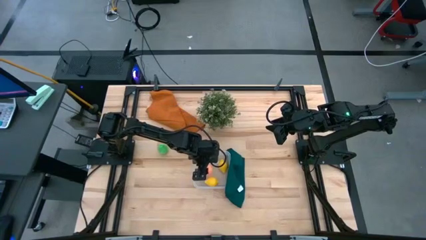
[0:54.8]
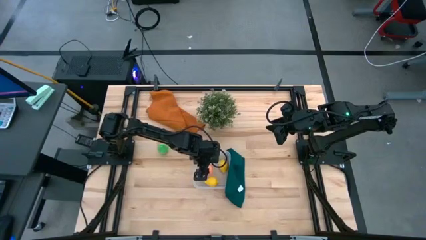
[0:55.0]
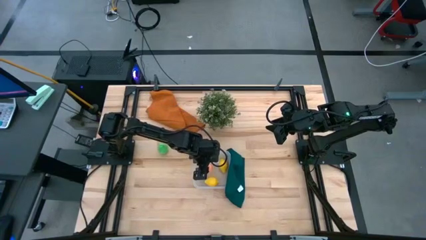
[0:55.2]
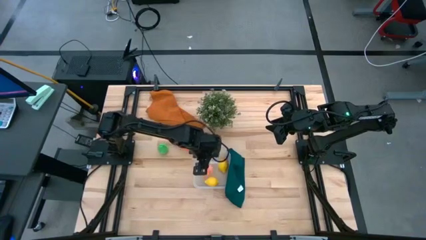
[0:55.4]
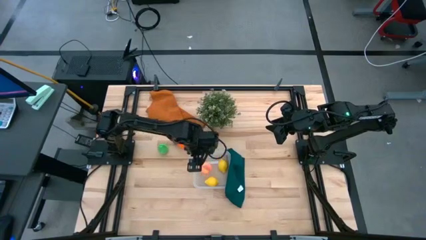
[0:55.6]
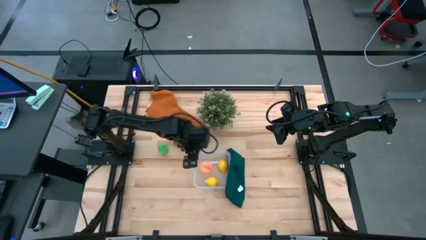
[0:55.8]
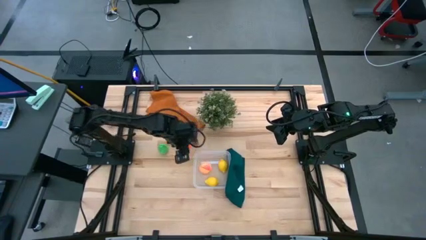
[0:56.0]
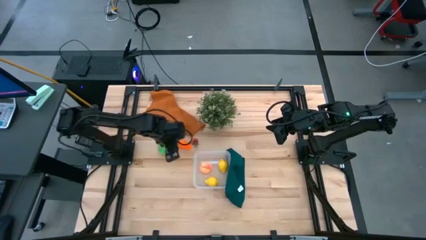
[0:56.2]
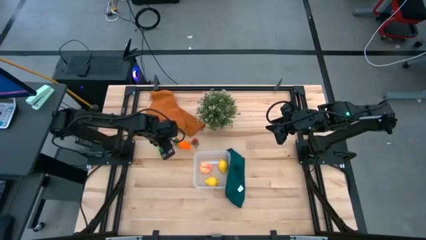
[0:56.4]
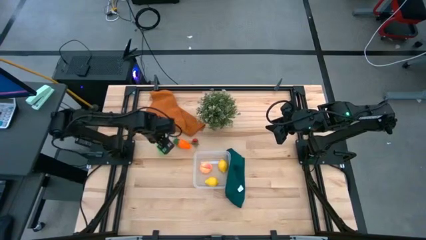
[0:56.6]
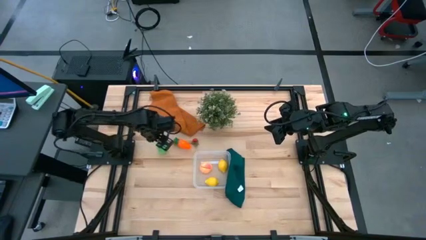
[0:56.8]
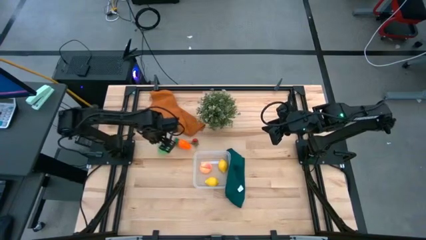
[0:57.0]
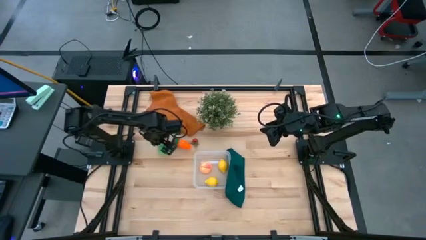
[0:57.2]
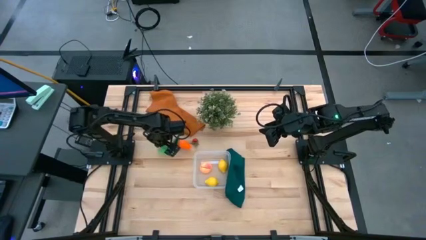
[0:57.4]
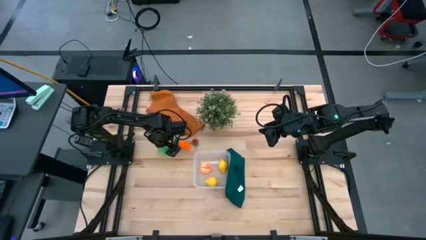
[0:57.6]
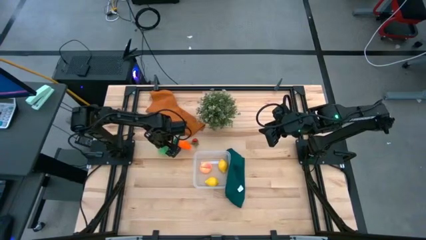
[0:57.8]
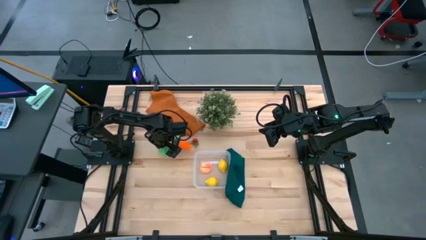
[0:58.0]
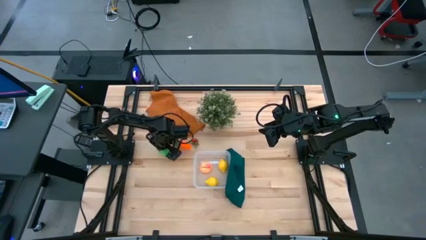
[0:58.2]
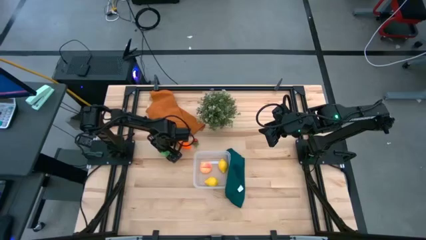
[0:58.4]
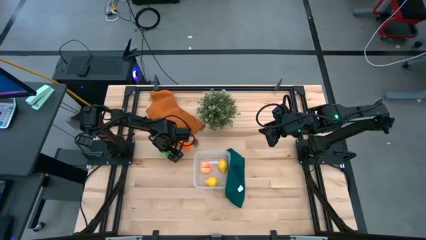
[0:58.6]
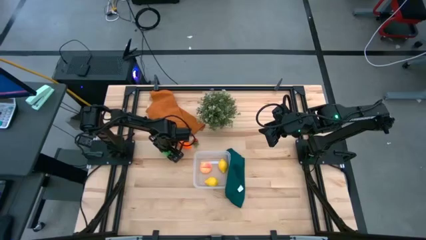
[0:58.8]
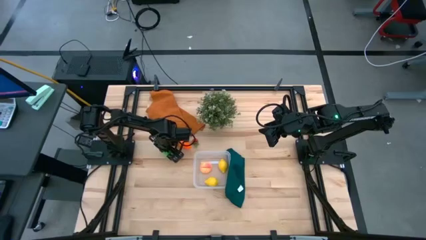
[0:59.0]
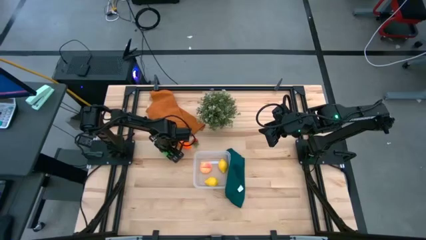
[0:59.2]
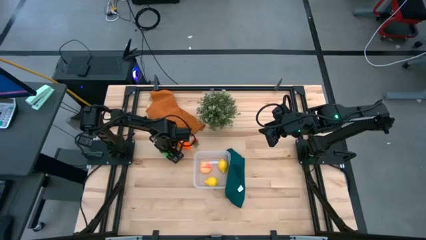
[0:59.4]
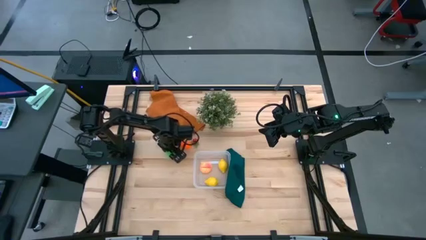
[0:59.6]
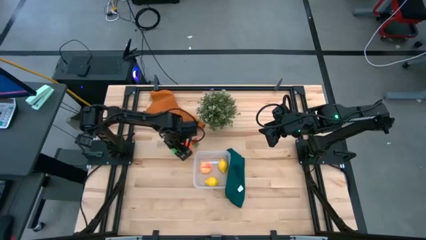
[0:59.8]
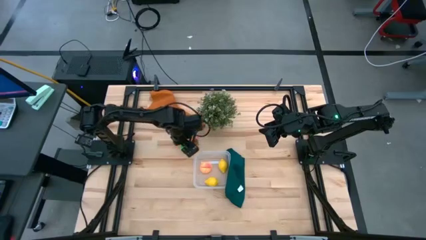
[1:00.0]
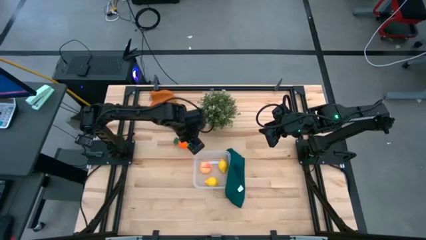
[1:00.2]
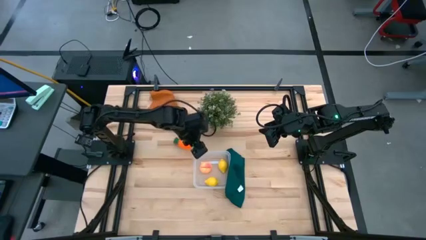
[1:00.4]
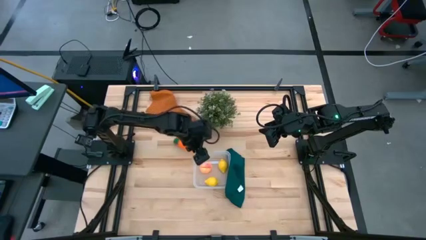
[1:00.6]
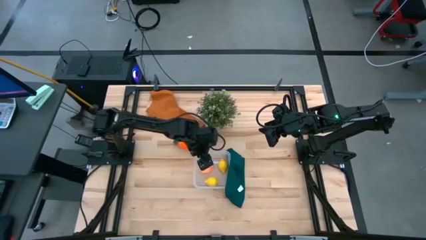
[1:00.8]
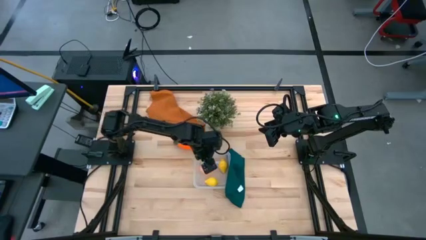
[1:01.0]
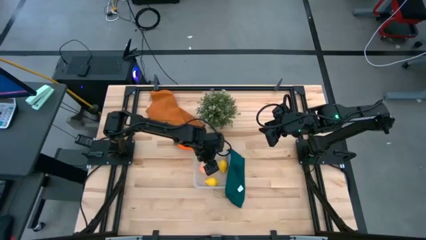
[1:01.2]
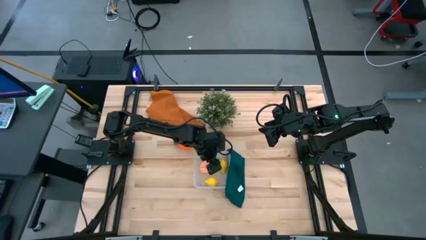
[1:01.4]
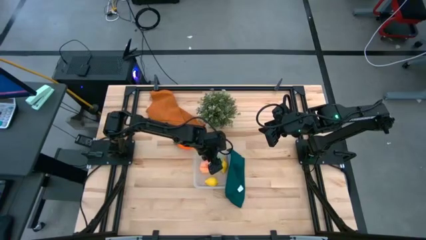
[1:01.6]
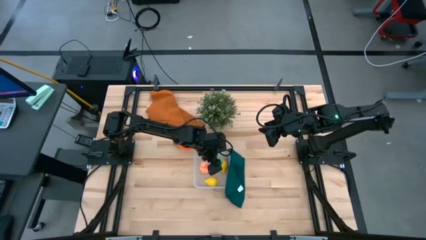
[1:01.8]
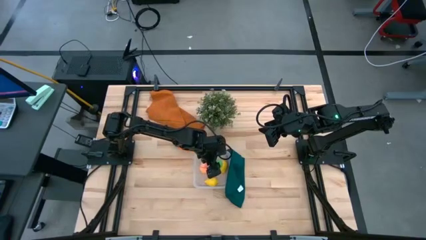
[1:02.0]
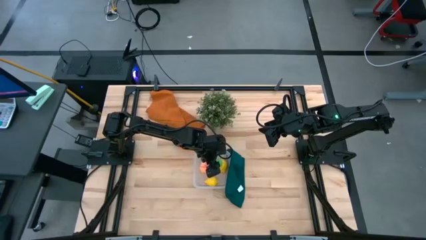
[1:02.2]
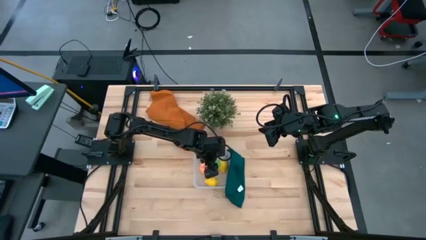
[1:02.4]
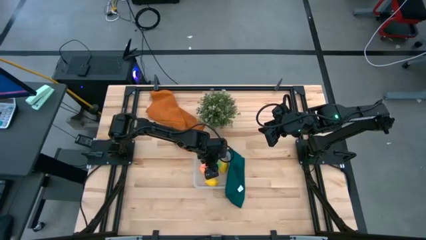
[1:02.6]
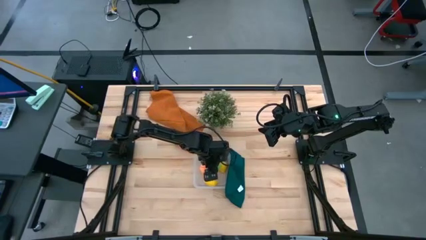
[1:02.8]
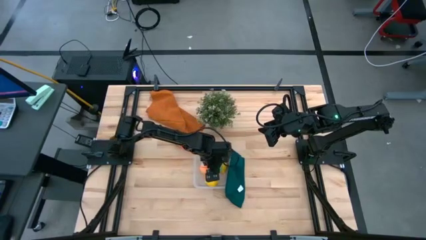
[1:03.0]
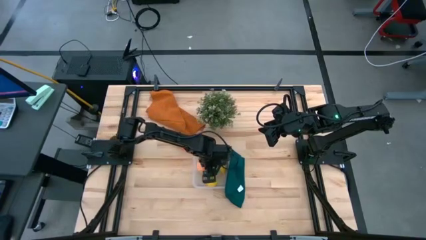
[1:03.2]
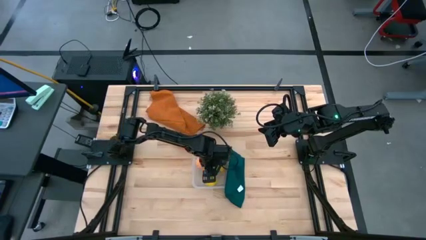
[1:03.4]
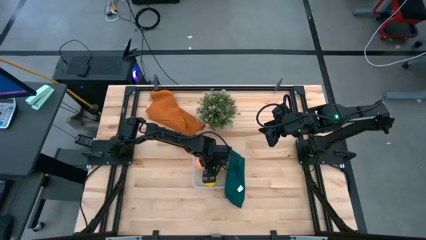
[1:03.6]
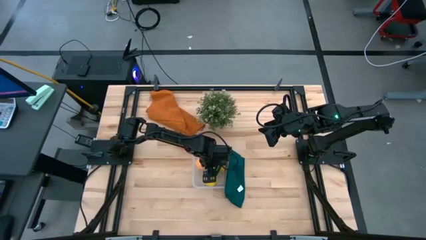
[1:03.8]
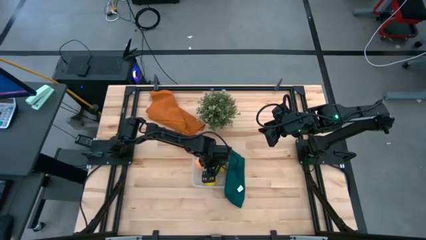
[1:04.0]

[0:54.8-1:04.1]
Task: Pick and placing Produce into tupperware
Put the green pear into the transparent bin

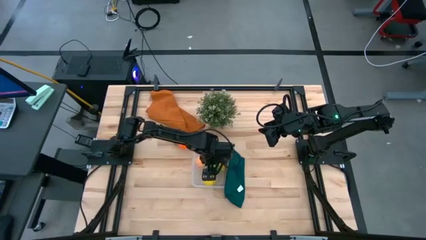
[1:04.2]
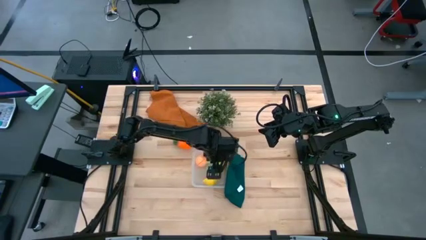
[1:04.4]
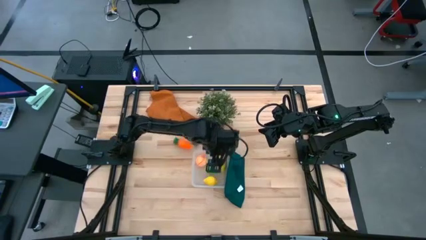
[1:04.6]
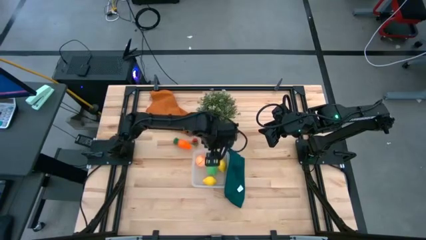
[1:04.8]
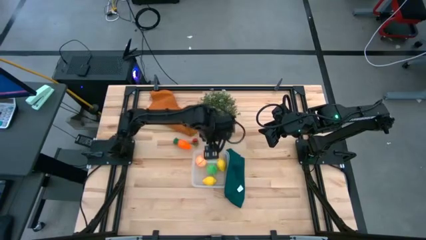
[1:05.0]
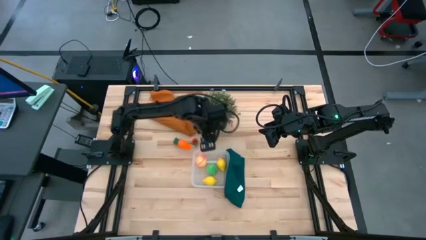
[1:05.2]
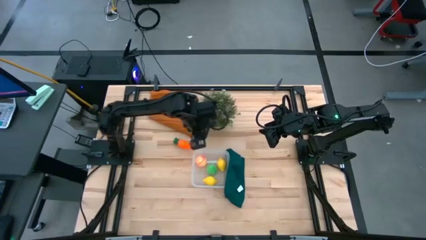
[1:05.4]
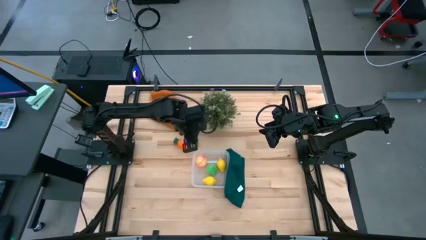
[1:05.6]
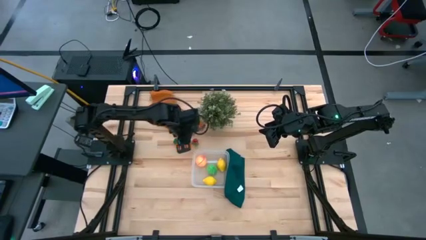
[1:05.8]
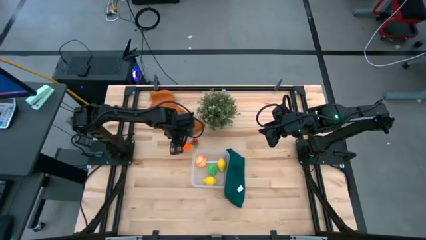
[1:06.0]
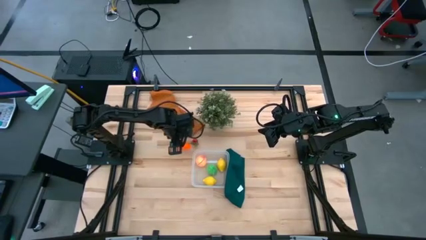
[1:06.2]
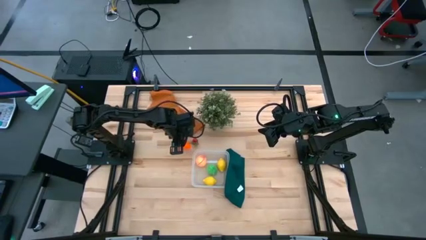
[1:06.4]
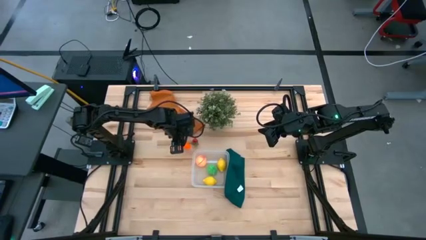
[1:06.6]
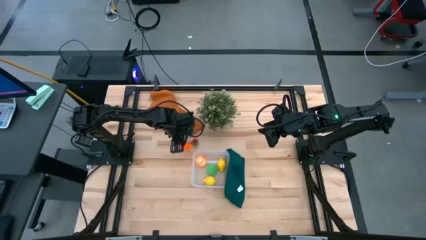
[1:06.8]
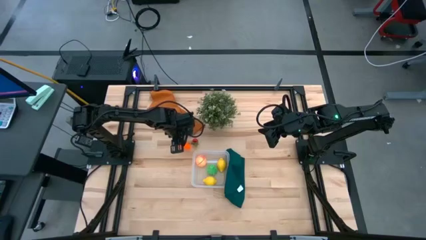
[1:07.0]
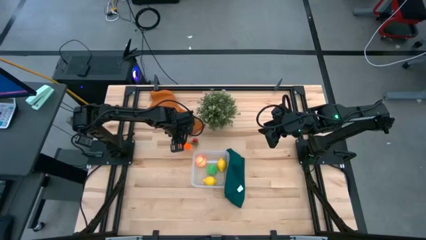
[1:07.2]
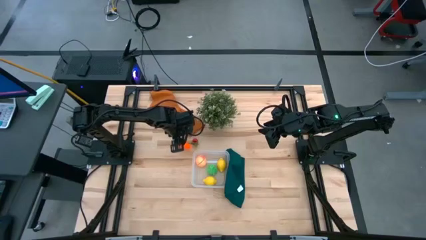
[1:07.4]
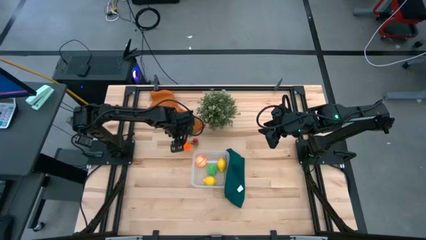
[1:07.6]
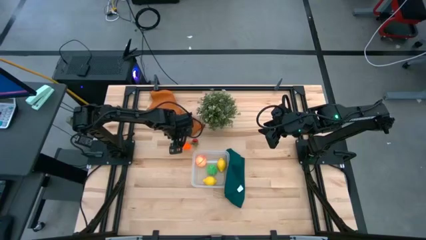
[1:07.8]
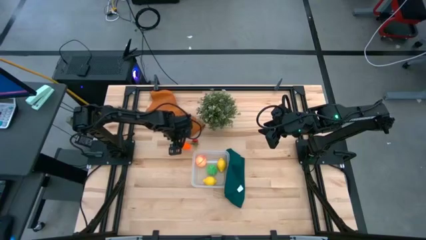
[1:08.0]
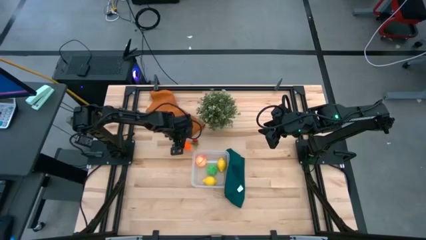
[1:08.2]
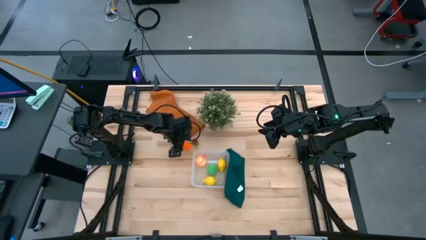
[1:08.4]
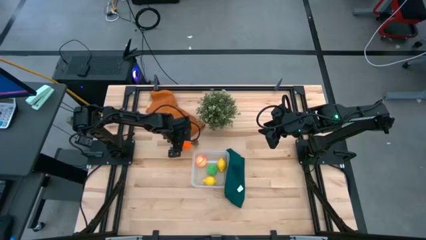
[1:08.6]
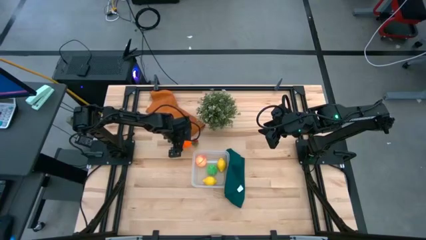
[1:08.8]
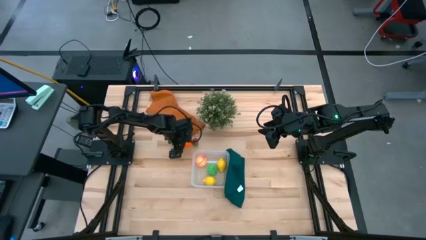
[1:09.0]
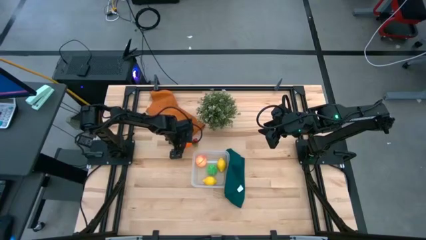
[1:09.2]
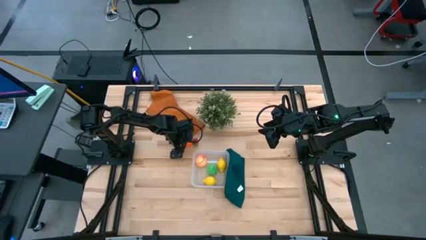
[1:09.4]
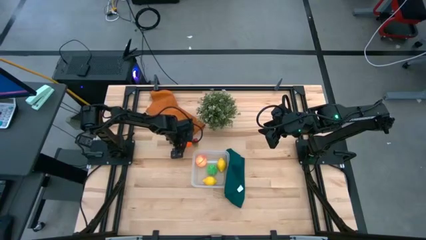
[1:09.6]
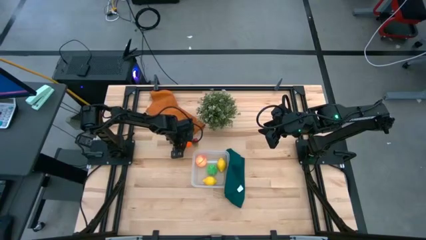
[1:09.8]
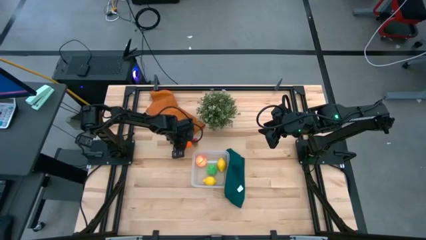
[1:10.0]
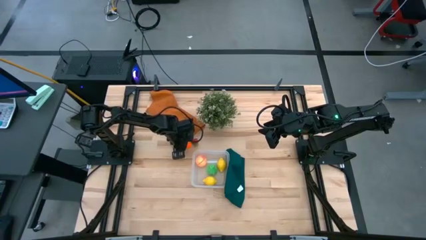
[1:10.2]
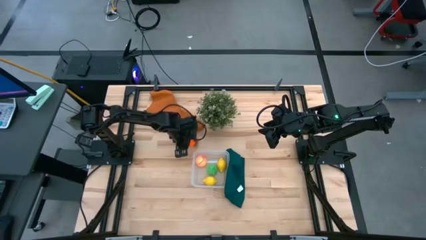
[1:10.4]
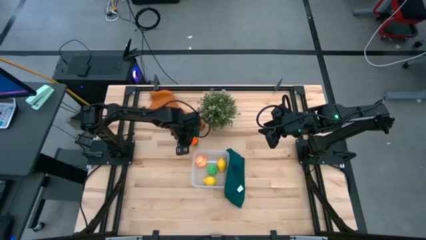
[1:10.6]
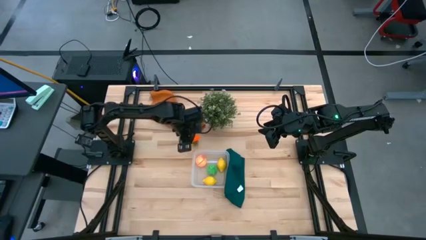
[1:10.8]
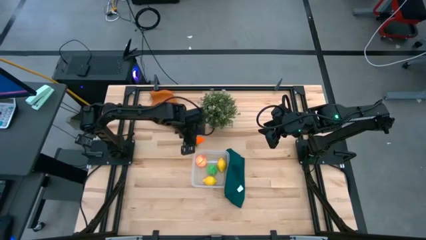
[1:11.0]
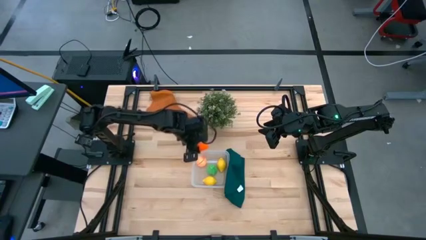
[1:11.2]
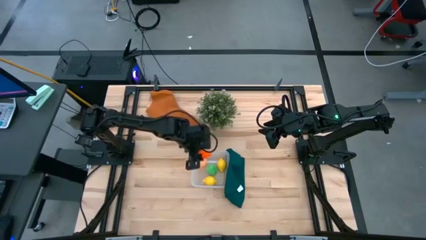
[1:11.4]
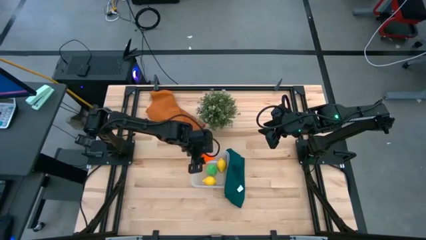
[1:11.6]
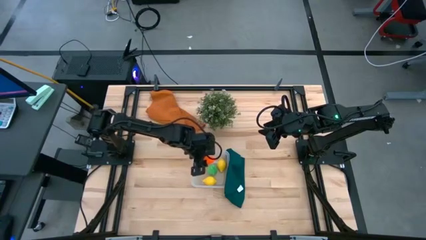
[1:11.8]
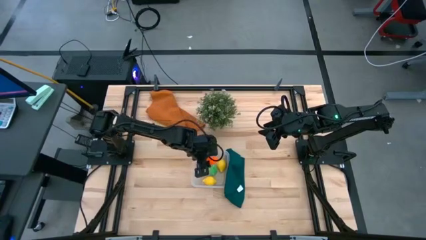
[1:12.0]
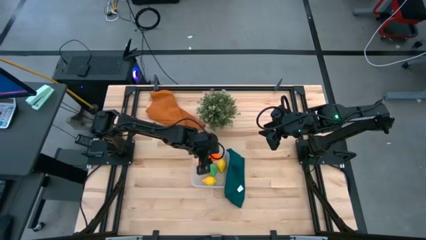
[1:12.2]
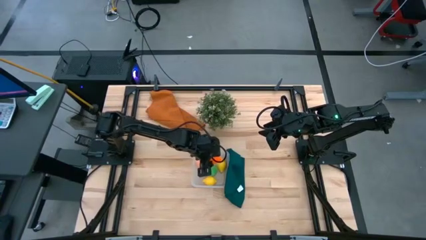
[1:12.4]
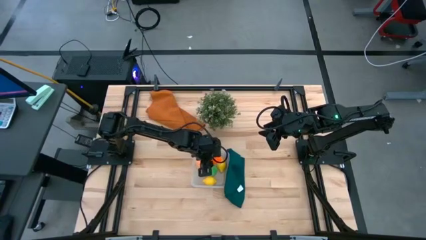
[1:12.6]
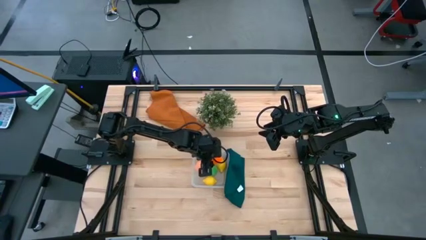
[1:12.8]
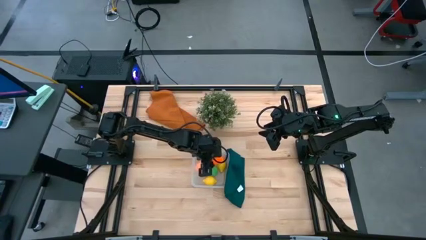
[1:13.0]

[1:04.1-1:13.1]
Put the orange carrot into the transparent bin
